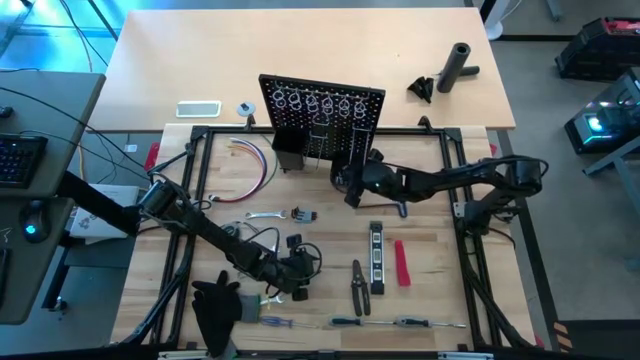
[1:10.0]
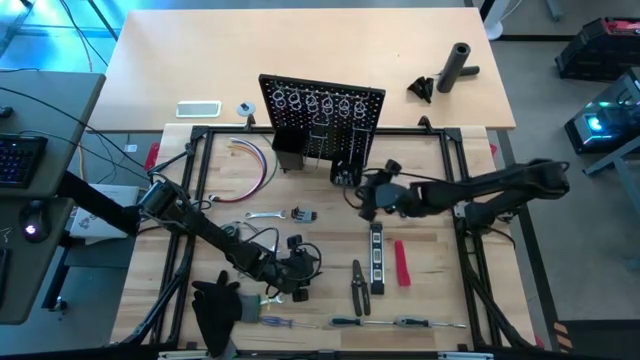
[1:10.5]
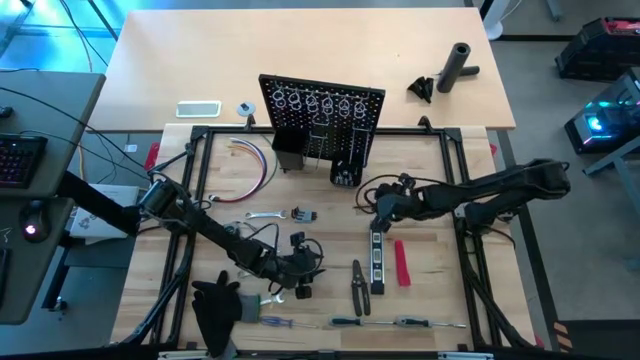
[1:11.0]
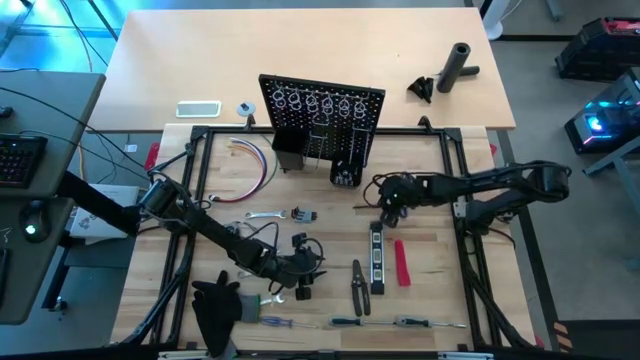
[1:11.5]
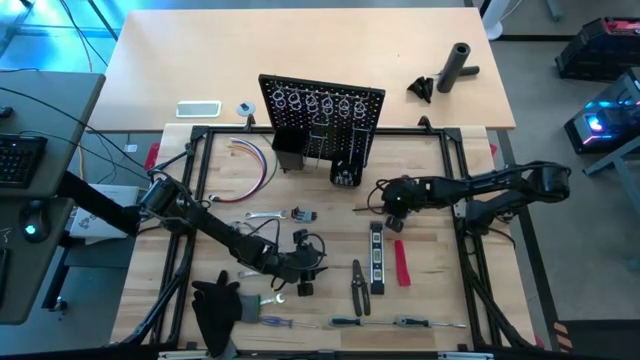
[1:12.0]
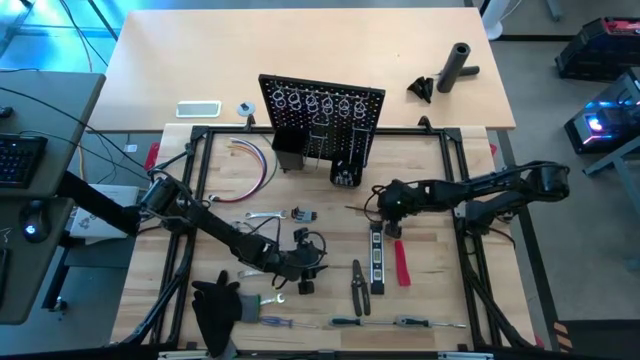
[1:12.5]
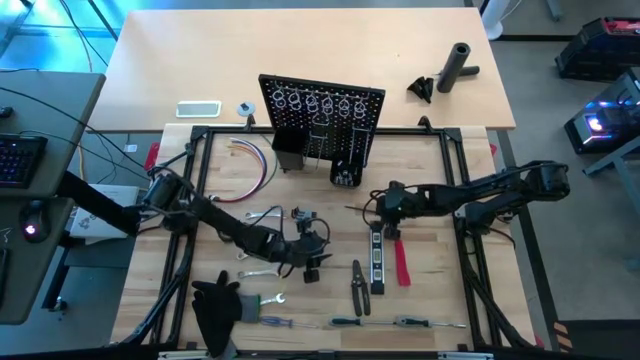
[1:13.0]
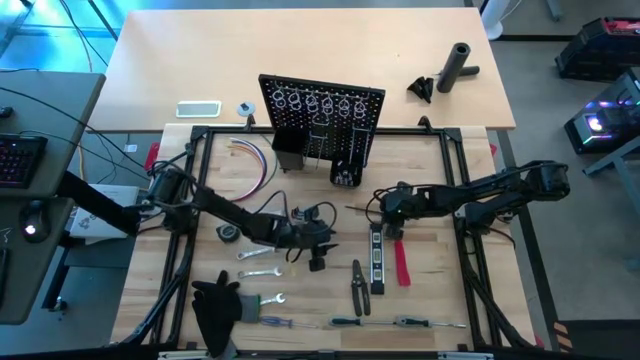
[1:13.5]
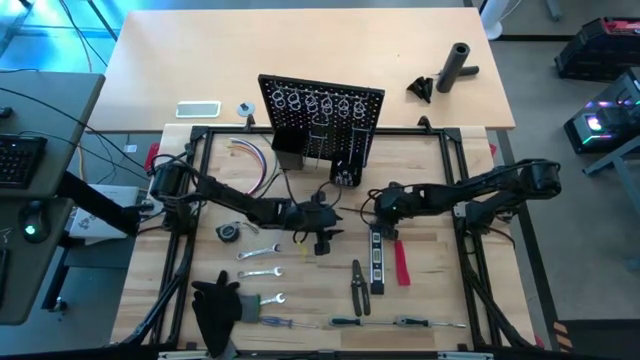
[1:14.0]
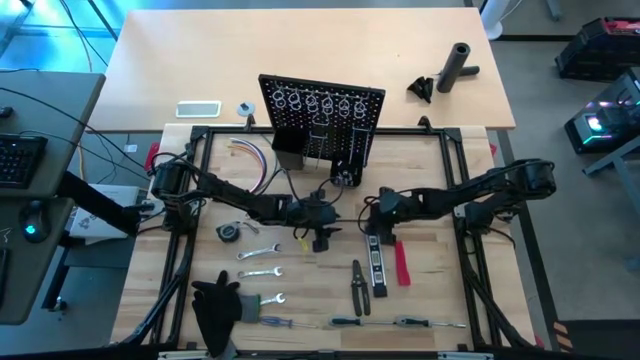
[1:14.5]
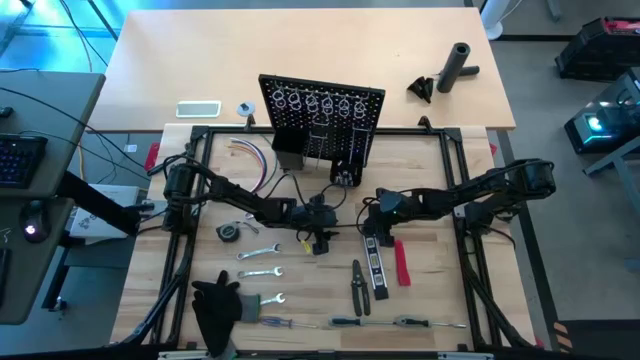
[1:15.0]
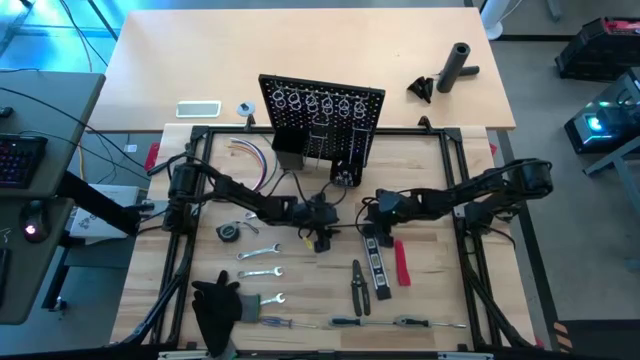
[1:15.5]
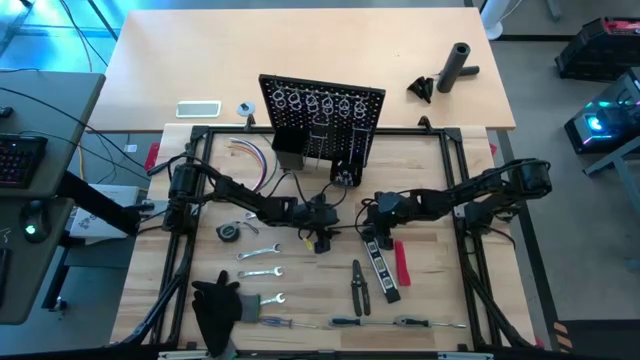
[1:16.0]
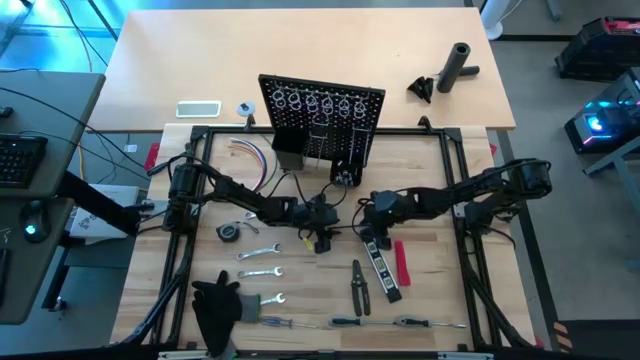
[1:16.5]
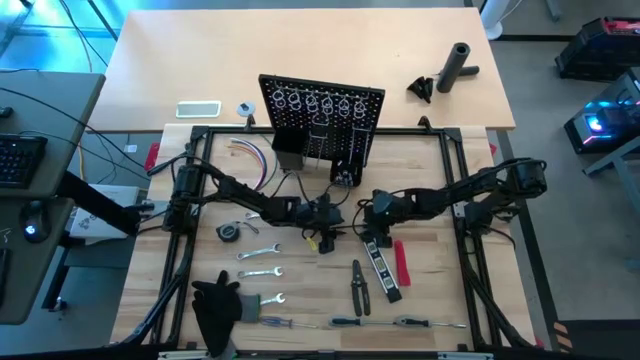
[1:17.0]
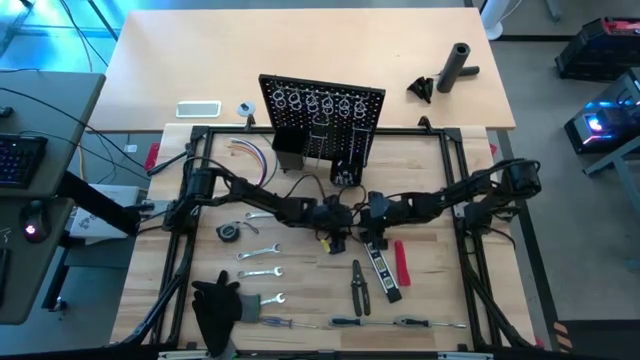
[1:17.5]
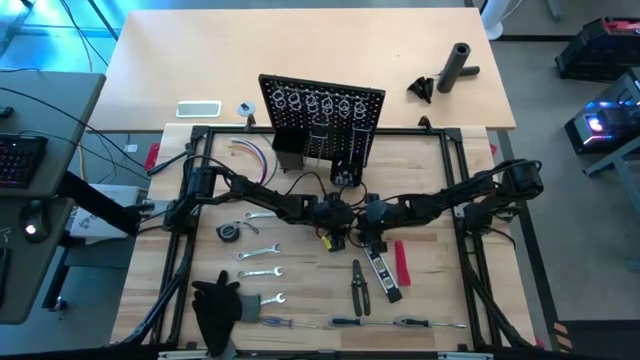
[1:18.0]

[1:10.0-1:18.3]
Task: Hang tools onto peg board
Hang the blue pick tool on the black pegboard

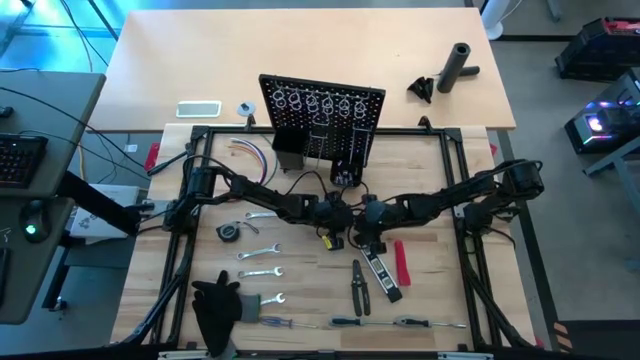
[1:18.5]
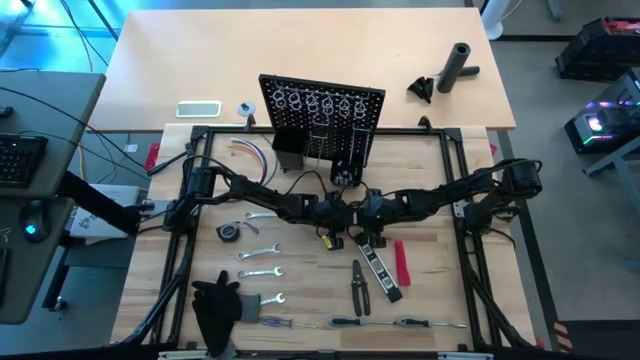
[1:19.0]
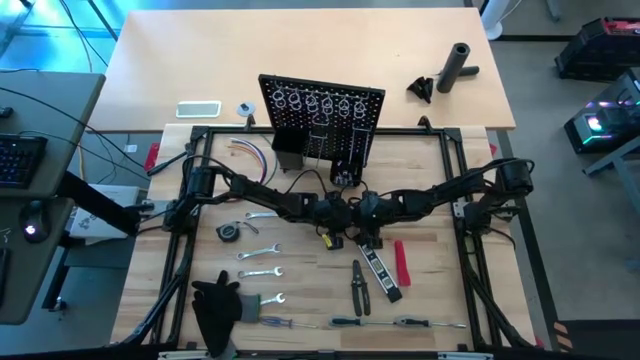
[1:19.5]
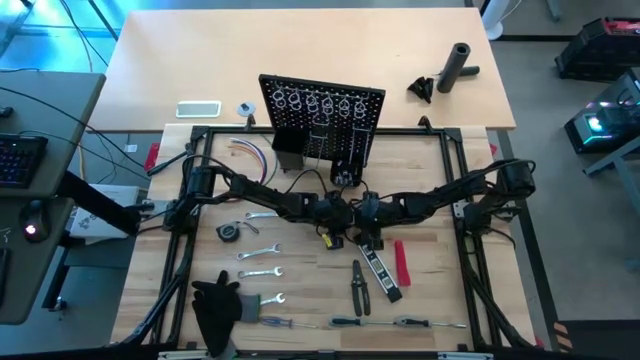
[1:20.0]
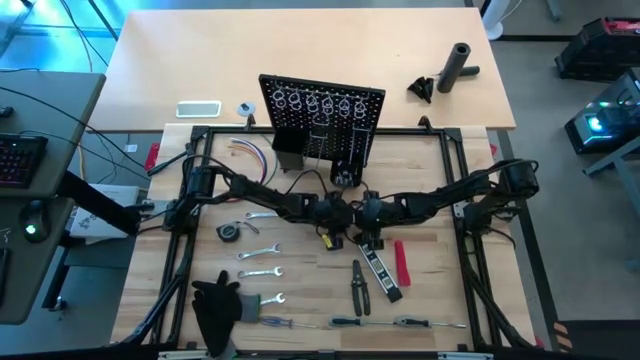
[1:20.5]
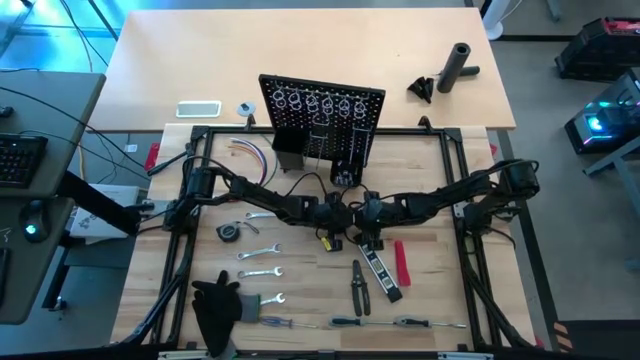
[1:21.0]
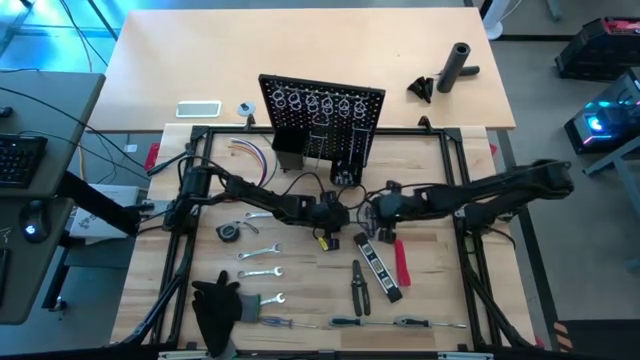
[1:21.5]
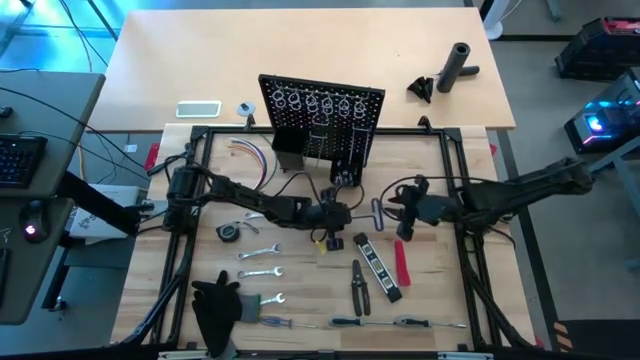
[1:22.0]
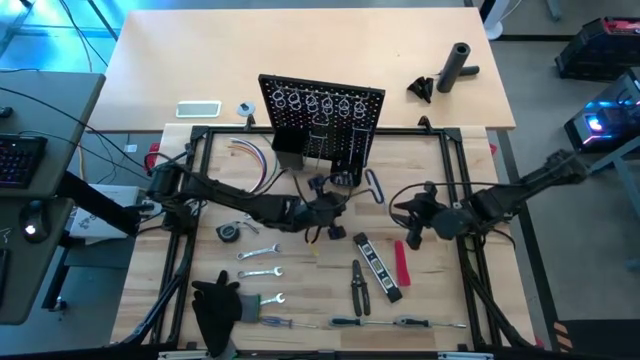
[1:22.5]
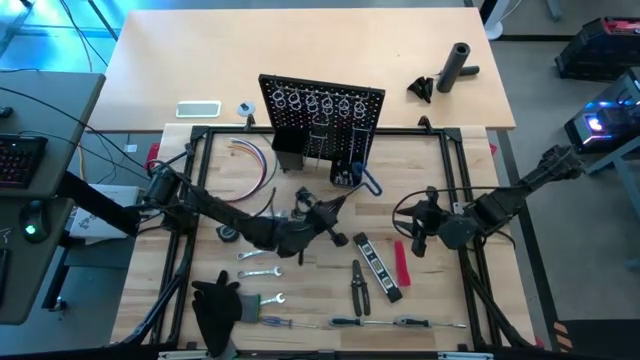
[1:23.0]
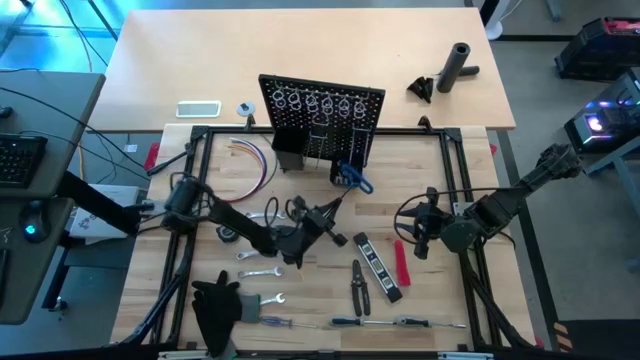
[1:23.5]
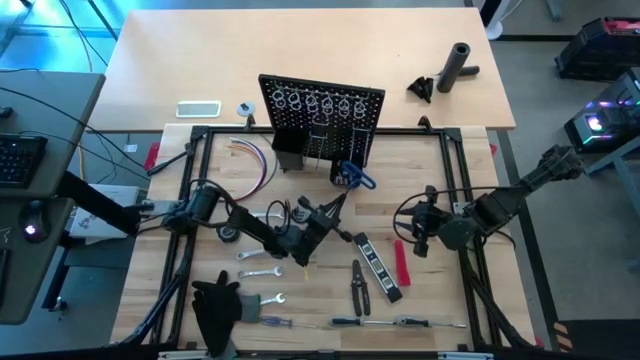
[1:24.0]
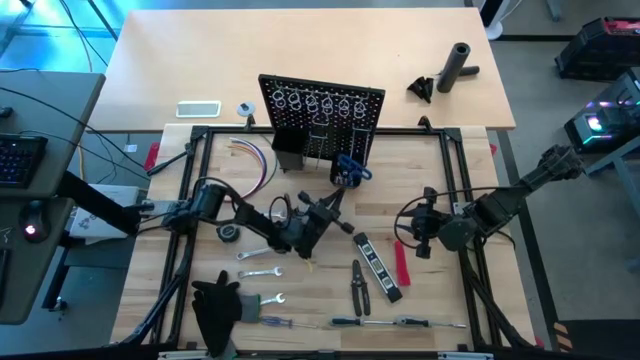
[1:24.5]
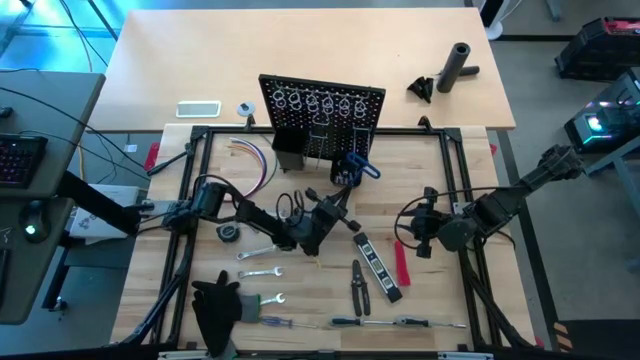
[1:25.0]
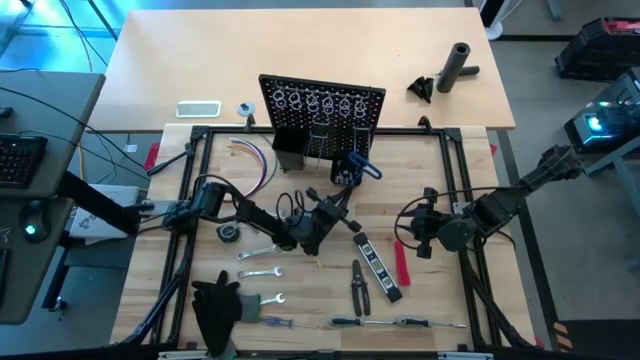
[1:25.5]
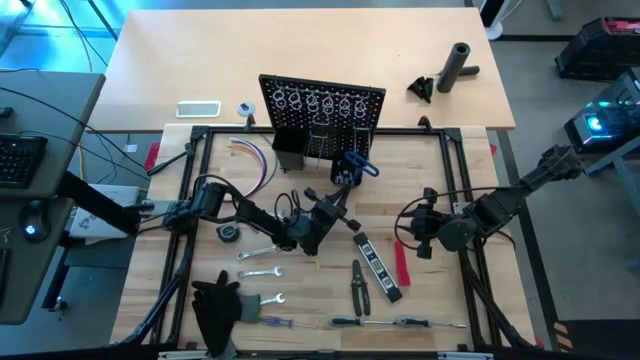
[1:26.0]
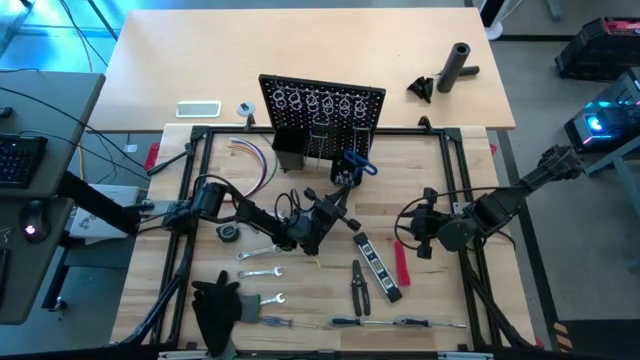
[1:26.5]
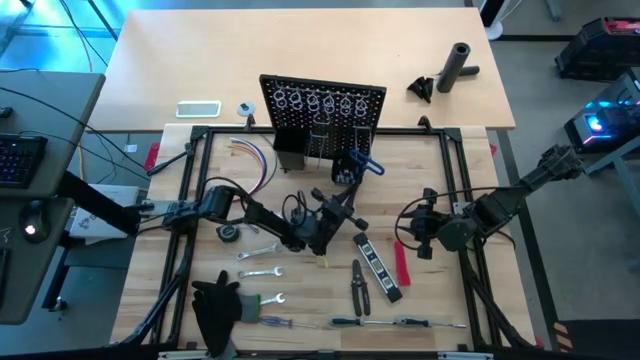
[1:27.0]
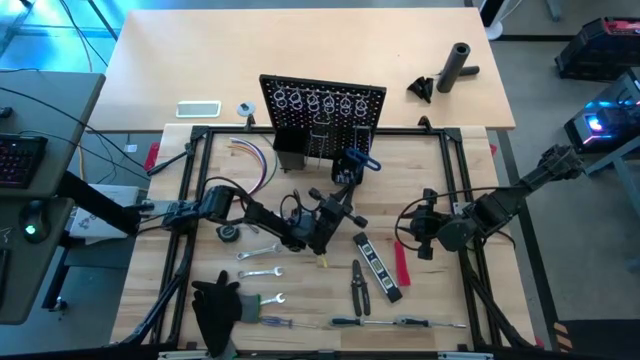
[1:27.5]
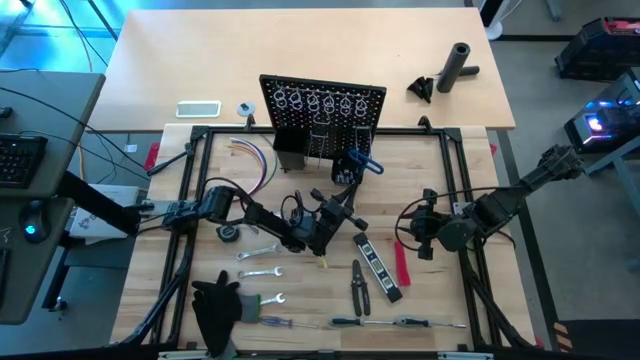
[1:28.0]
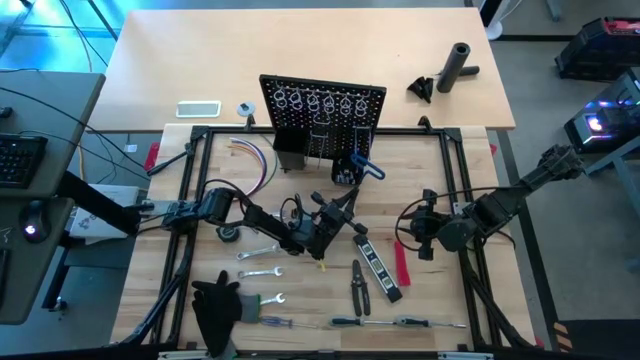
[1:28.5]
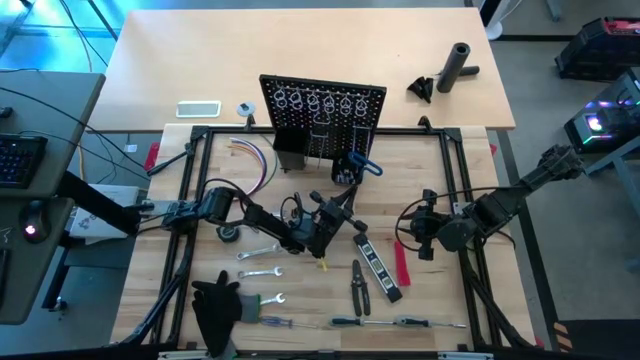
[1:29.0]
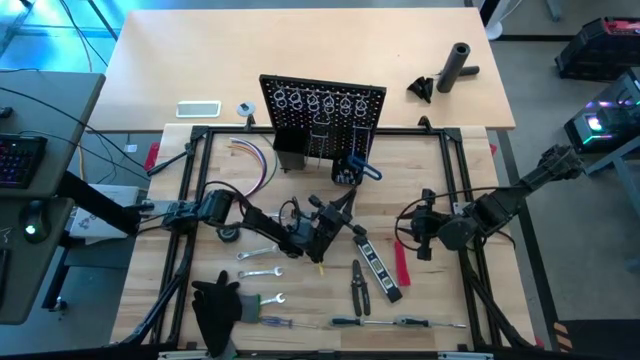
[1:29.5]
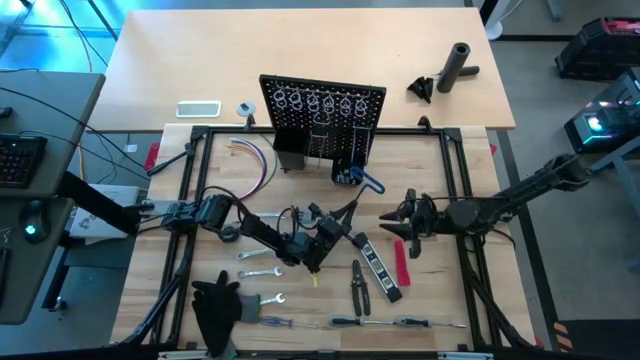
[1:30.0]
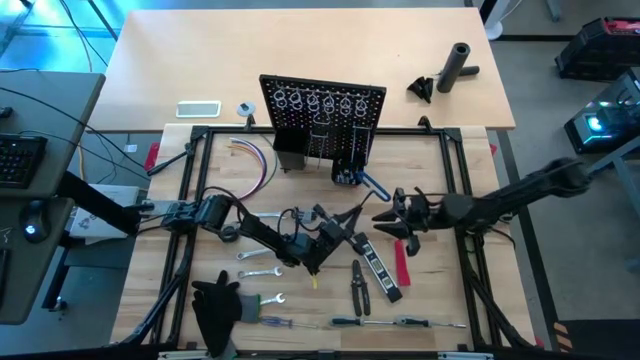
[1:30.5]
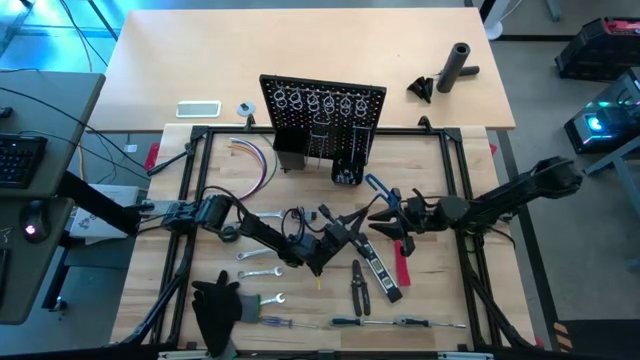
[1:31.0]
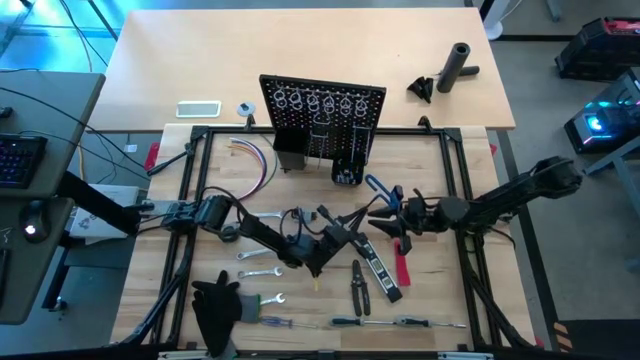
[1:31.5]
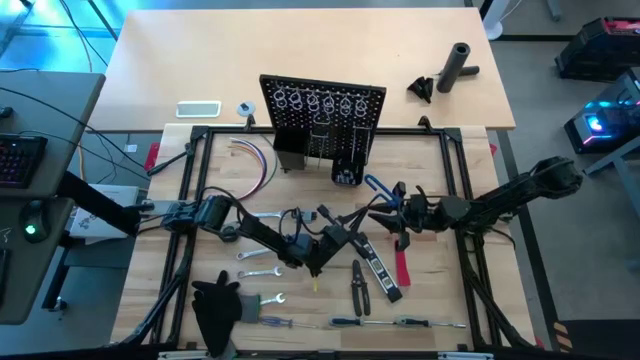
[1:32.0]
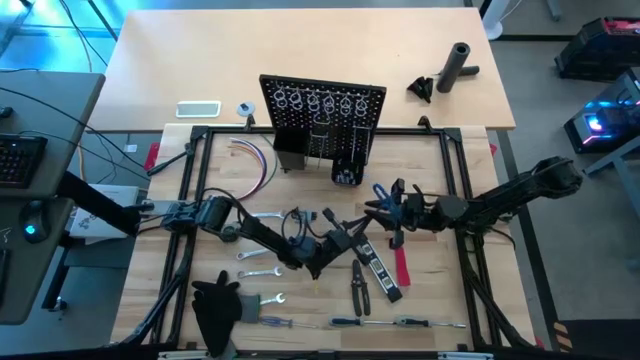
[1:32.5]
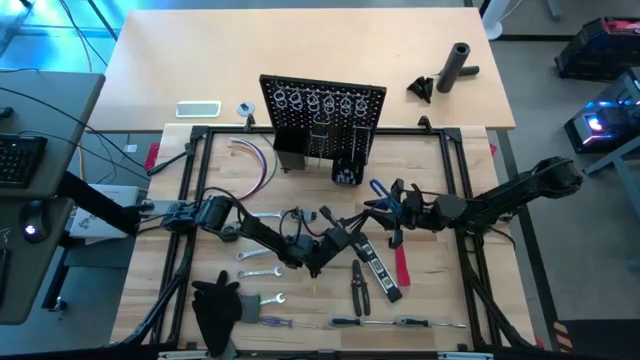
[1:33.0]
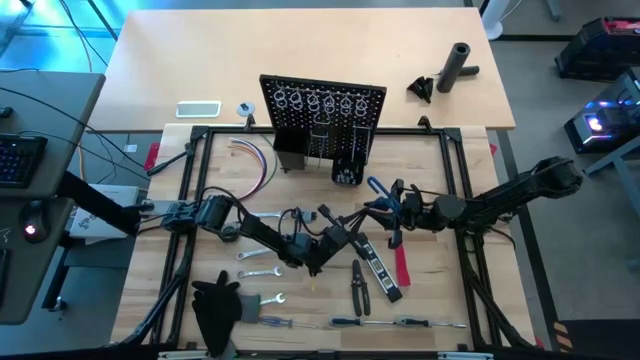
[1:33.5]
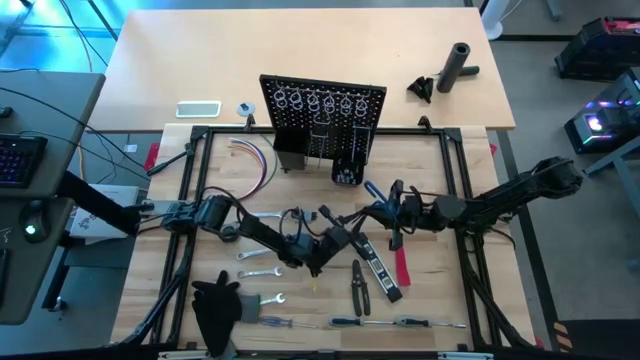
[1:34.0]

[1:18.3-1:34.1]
Hang the blue pick tool on the black pegboard
